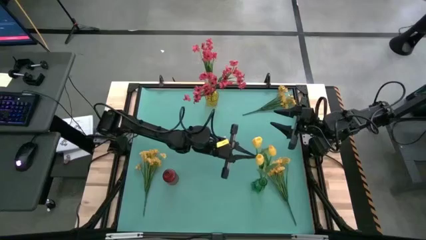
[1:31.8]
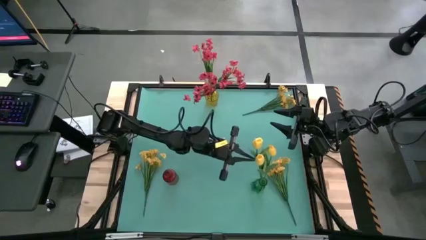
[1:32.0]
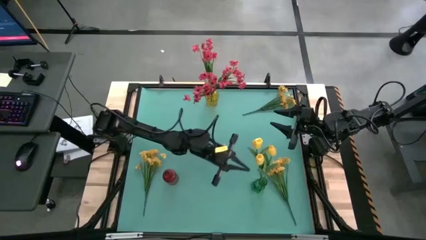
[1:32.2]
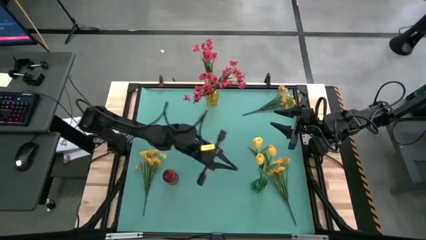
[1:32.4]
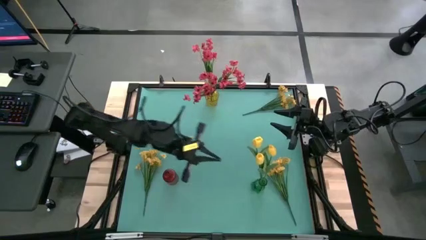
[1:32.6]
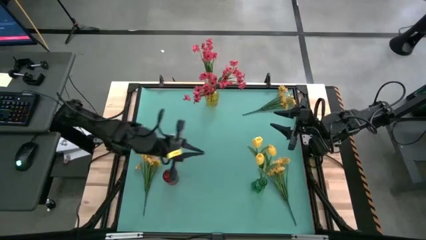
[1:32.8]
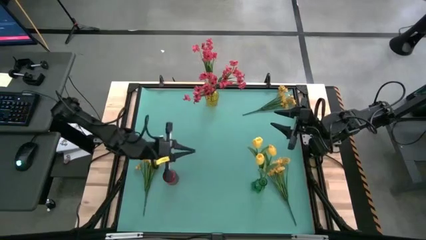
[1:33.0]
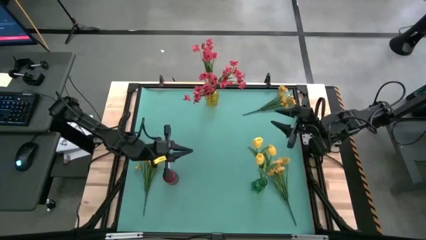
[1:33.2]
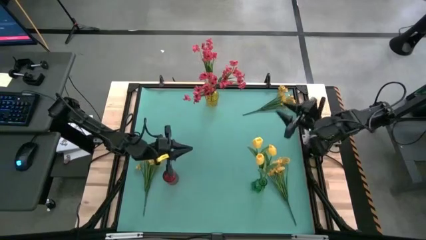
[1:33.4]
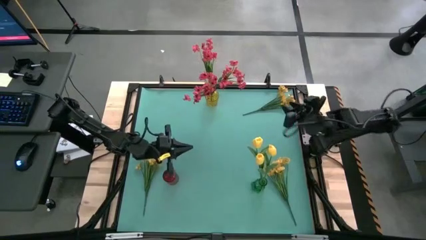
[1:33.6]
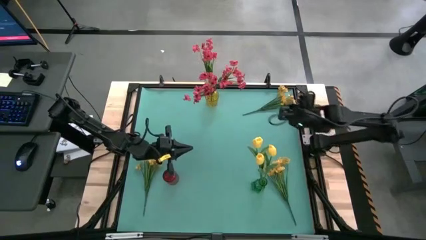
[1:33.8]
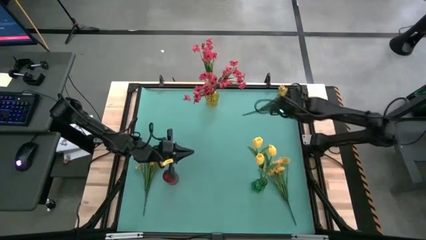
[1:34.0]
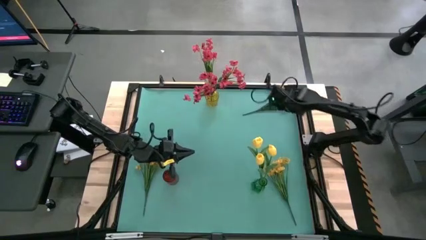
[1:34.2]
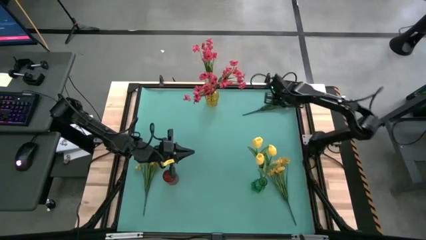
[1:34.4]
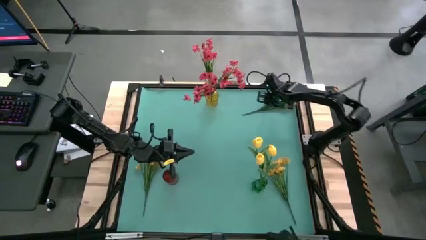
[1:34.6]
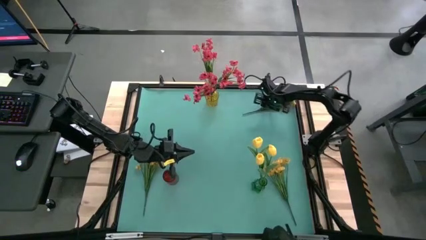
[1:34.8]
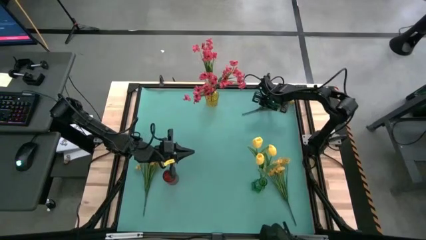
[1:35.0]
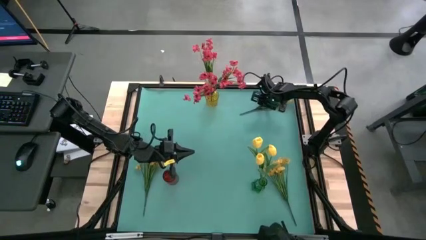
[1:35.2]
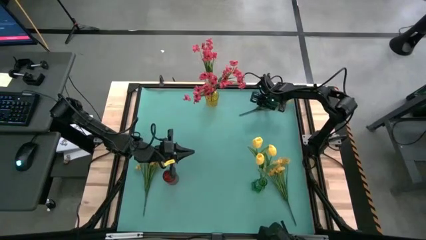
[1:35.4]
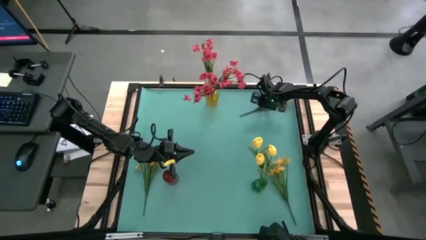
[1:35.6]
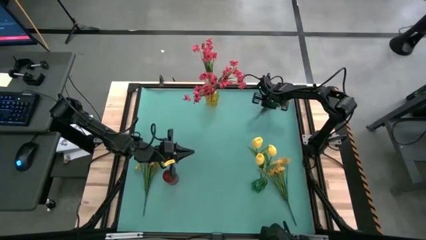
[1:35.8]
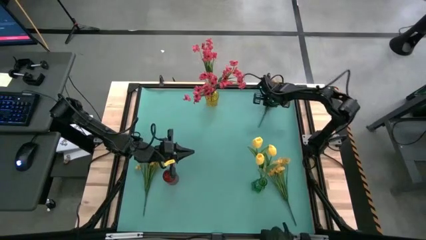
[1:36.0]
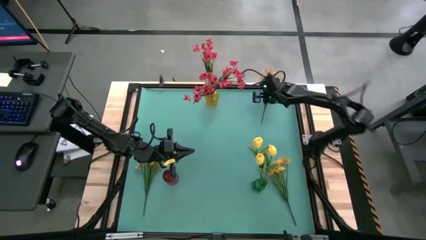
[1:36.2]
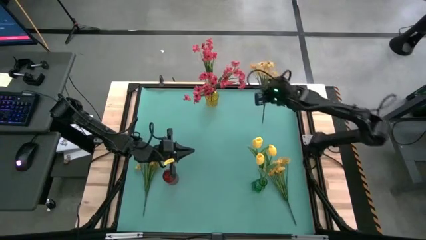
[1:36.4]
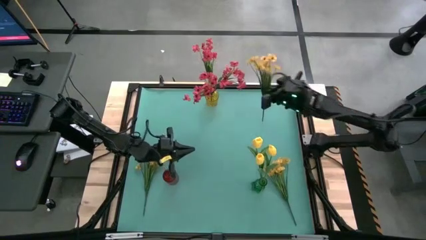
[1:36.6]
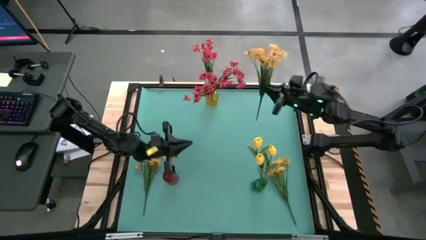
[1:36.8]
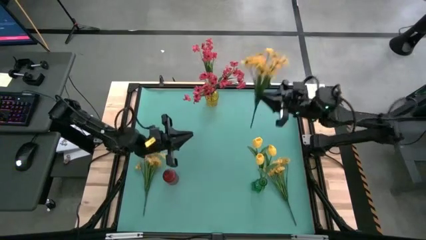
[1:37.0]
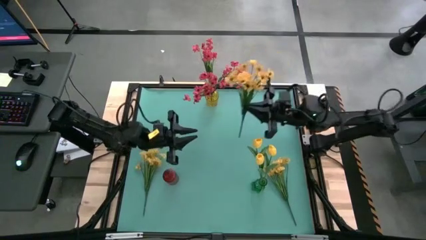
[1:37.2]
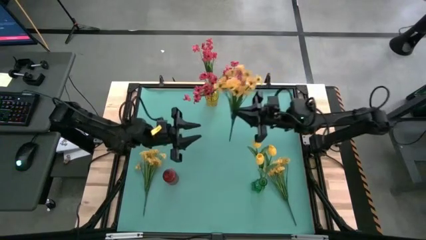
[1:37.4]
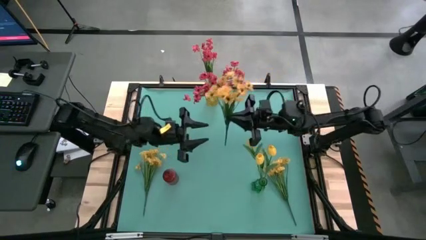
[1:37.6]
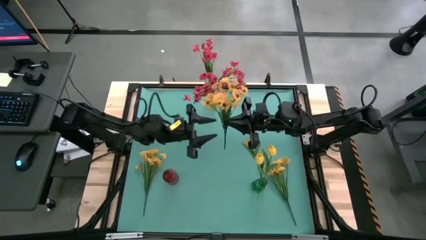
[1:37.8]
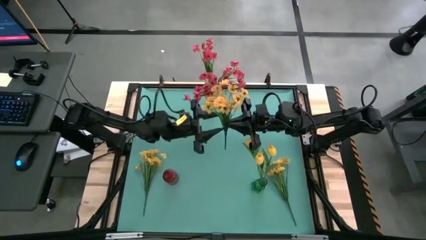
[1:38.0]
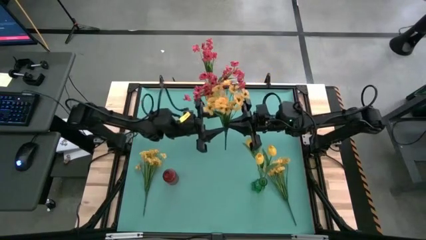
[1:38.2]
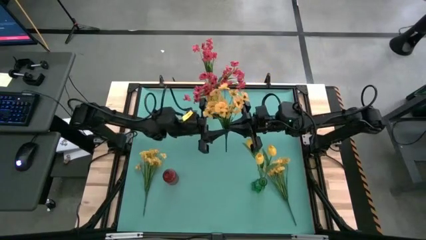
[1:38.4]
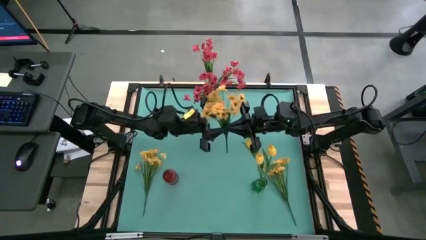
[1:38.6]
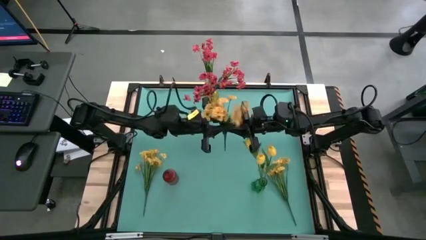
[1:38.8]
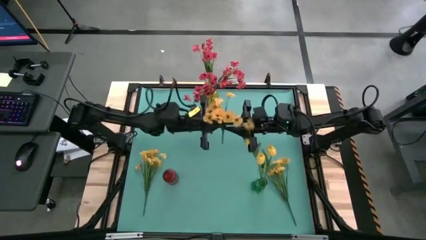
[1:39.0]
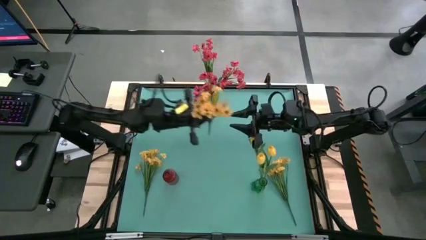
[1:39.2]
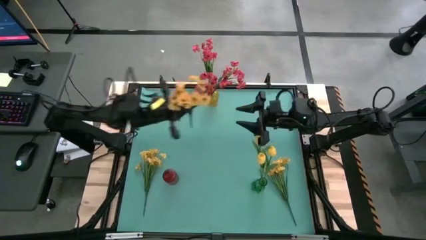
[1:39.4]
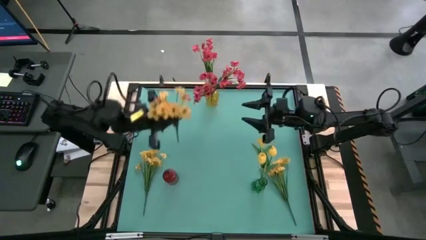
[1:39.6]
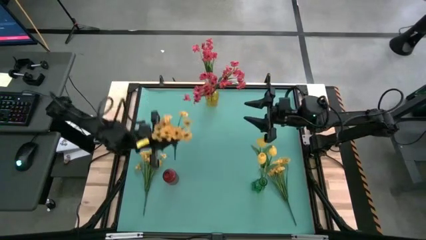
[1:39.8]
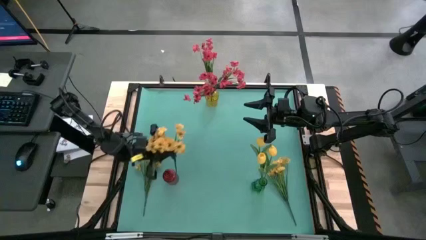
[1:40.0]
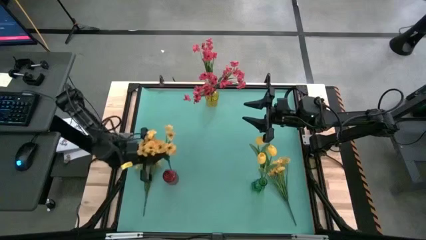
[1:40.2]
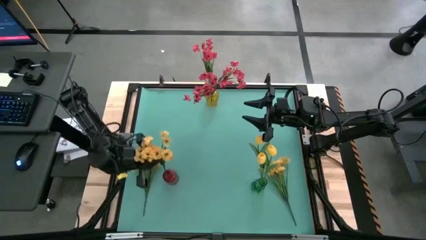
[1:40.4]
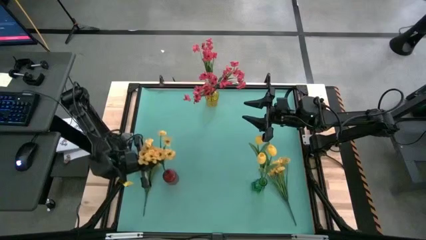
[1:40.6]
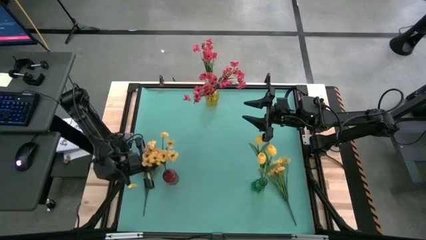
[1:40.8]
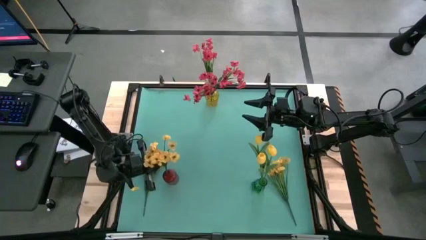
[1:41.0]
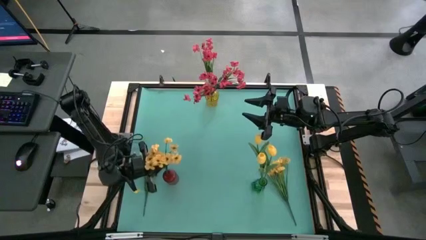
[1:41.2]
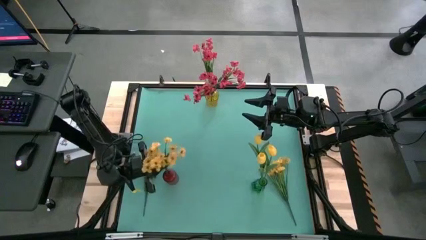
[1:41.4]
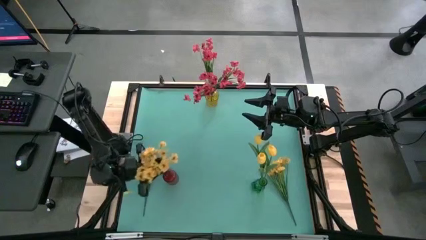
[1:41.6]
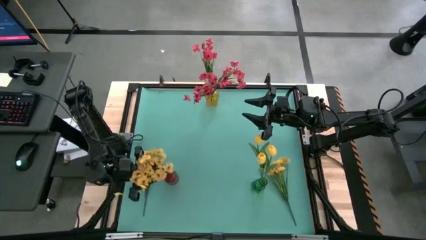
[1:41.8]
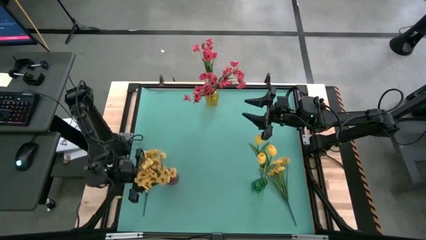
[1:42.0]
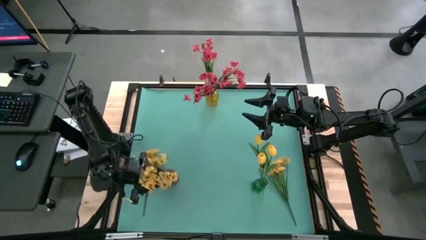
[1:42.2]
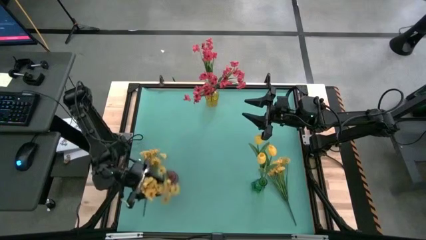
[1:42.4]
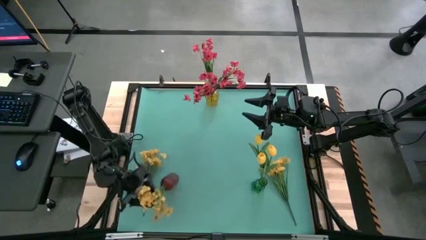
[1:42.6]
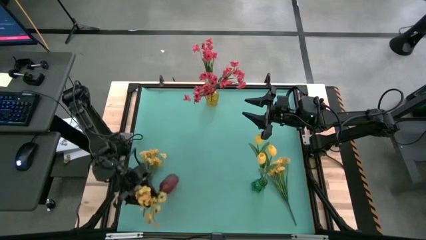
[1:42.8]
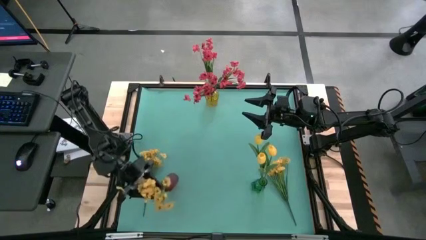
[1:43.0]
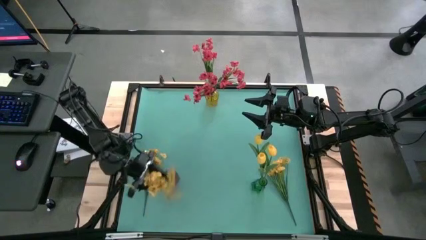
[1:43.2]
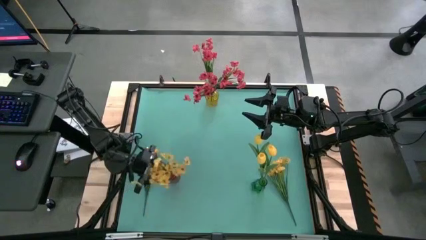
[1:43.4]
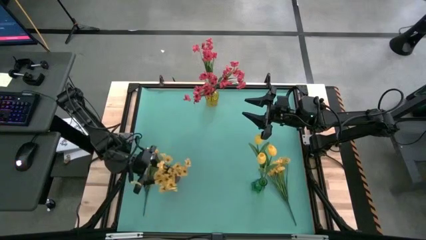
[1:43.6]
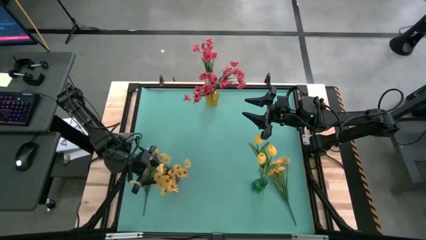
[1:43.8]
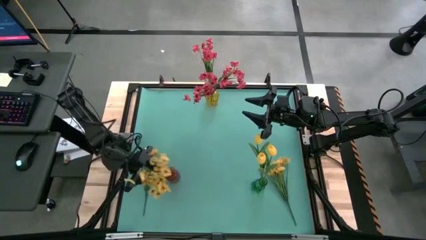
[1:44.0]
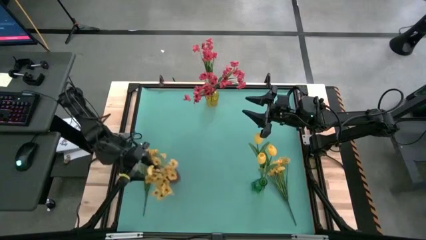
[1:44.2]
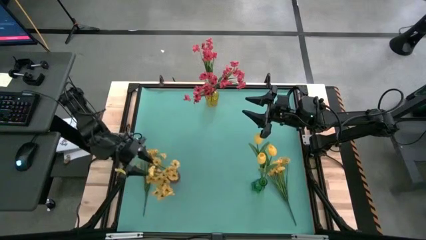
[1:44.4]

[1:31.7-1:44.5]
Task: Sort flowers into vase by color
Put the top right yellow flowers into the red vase
